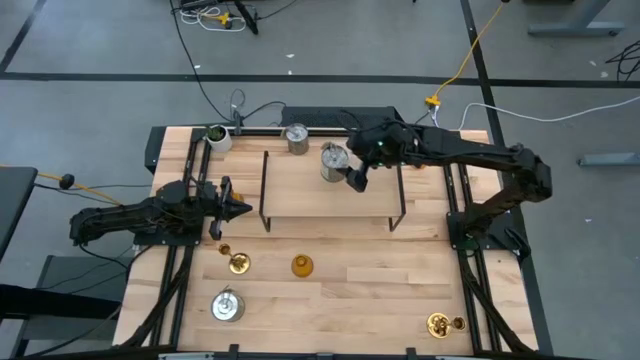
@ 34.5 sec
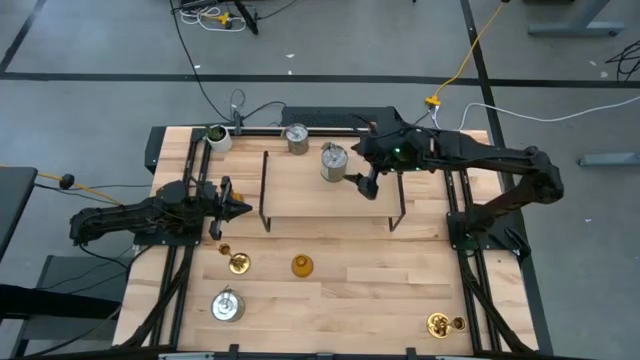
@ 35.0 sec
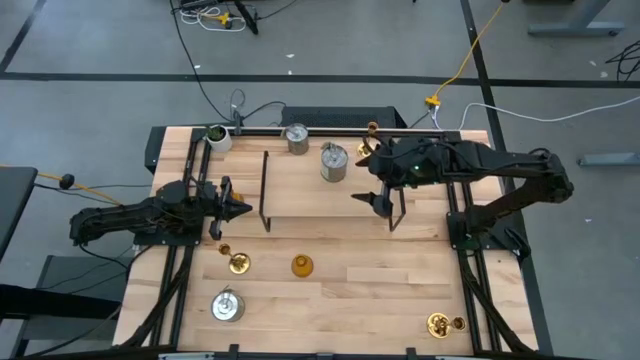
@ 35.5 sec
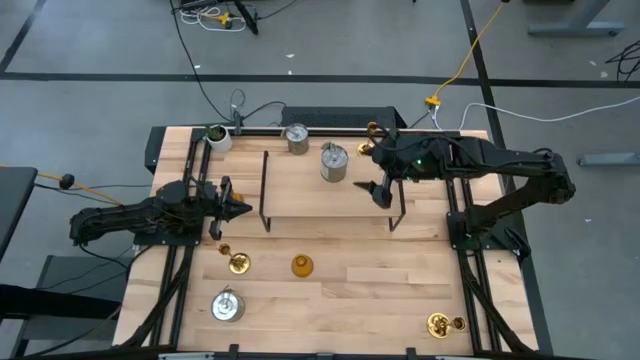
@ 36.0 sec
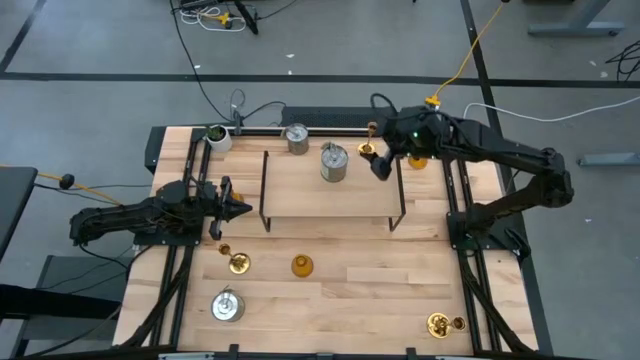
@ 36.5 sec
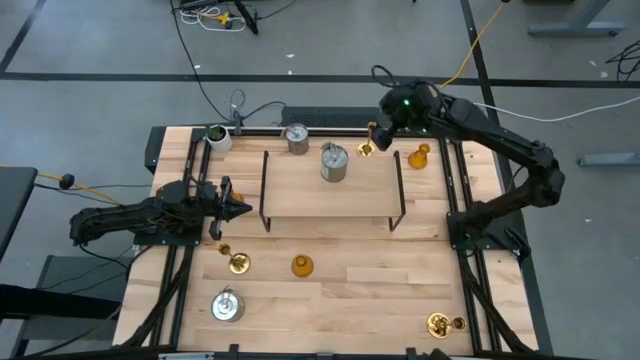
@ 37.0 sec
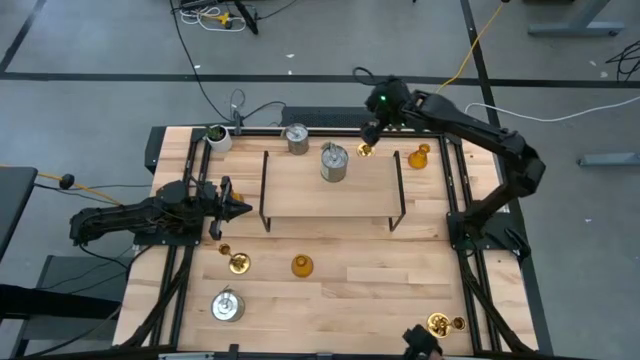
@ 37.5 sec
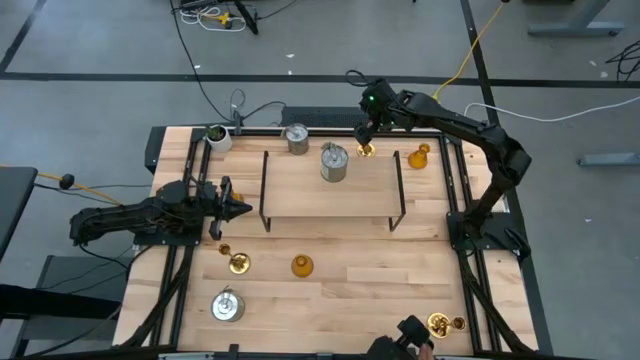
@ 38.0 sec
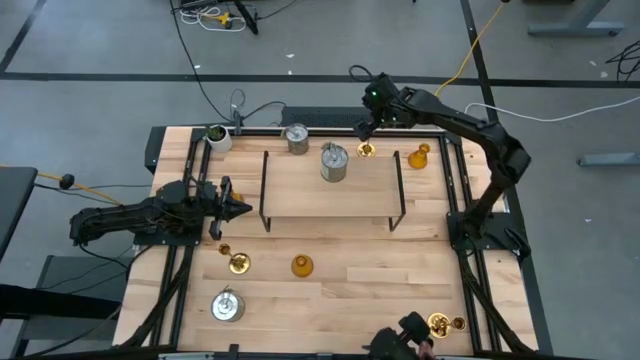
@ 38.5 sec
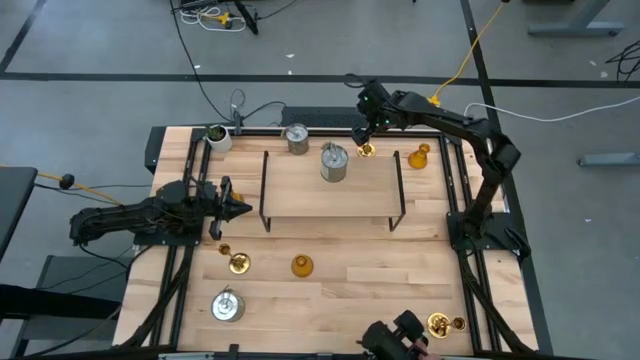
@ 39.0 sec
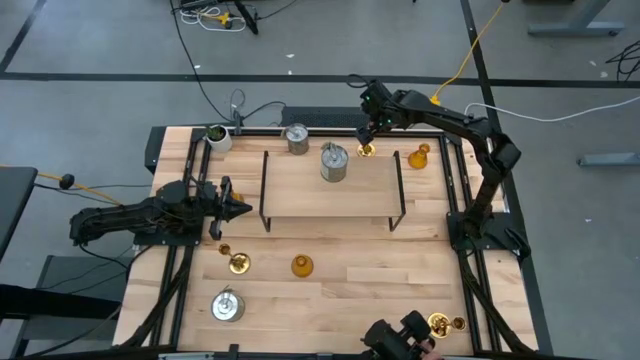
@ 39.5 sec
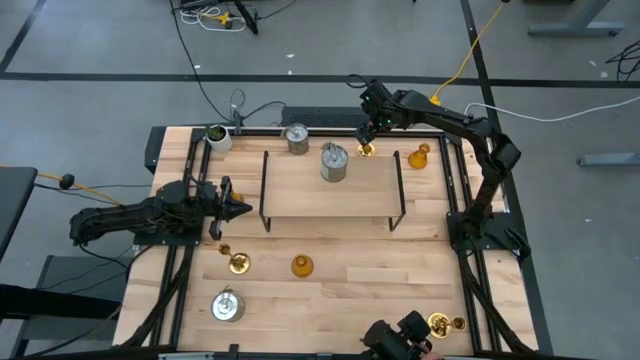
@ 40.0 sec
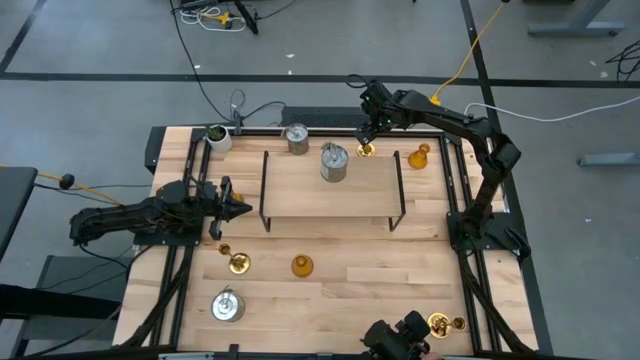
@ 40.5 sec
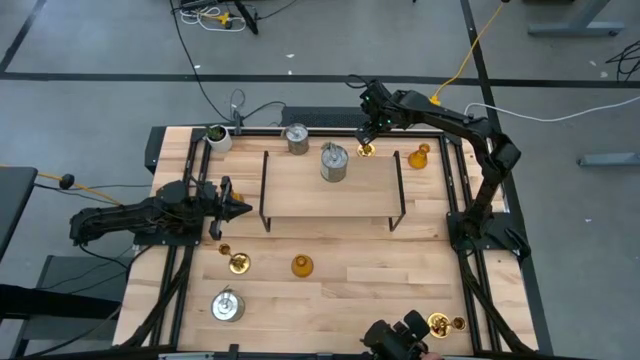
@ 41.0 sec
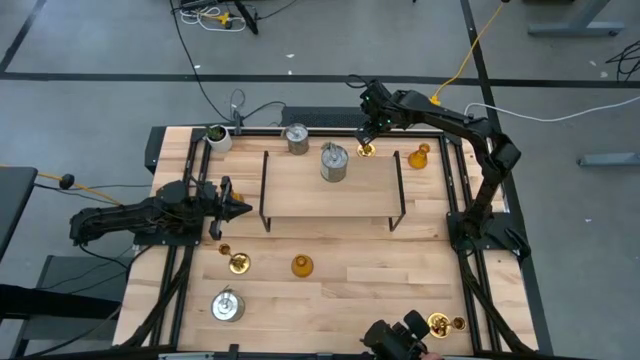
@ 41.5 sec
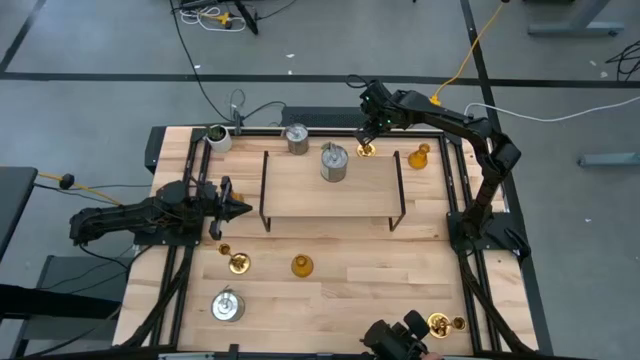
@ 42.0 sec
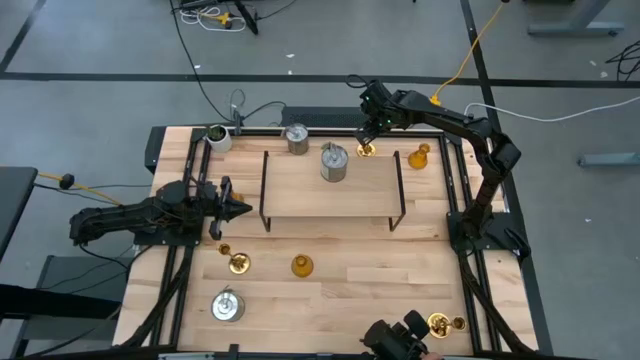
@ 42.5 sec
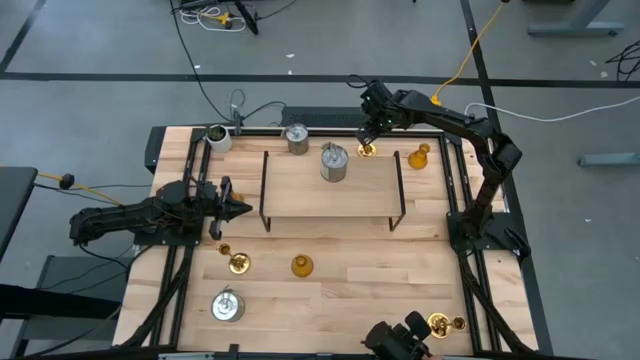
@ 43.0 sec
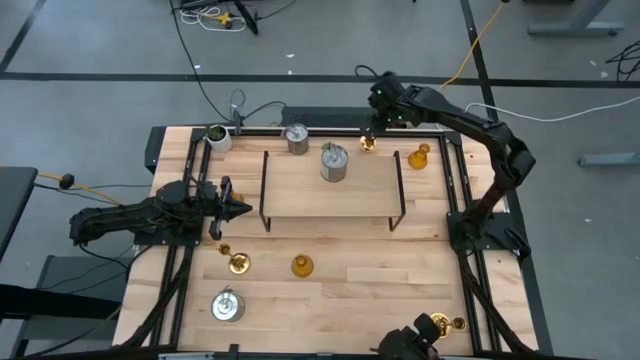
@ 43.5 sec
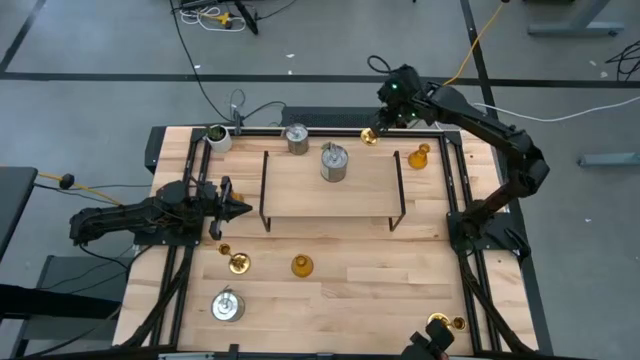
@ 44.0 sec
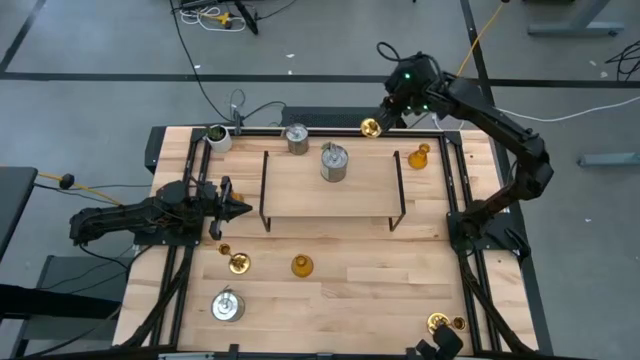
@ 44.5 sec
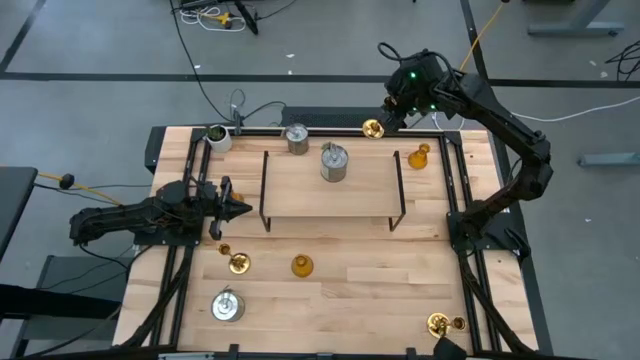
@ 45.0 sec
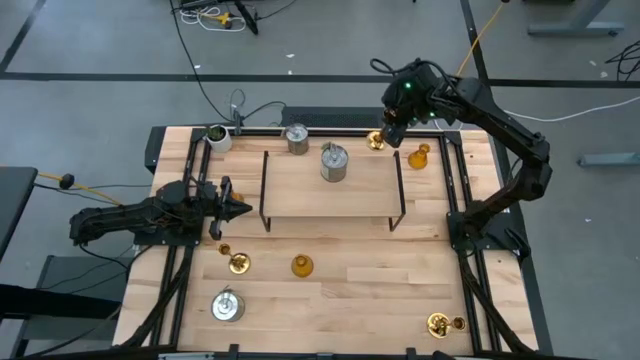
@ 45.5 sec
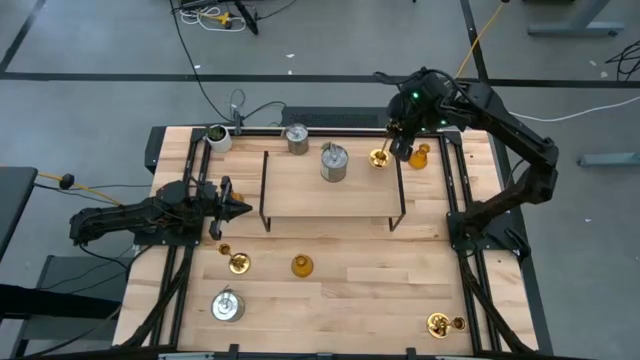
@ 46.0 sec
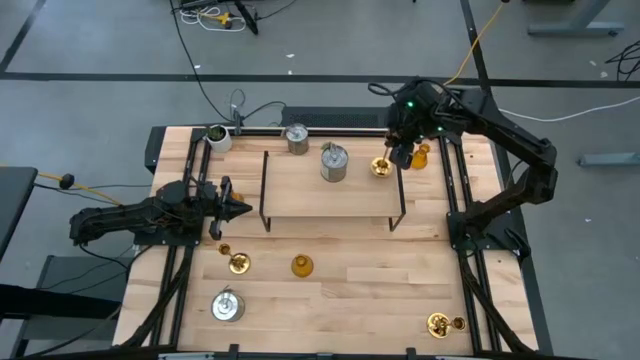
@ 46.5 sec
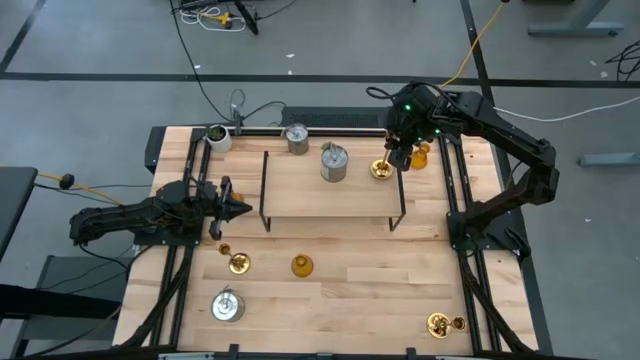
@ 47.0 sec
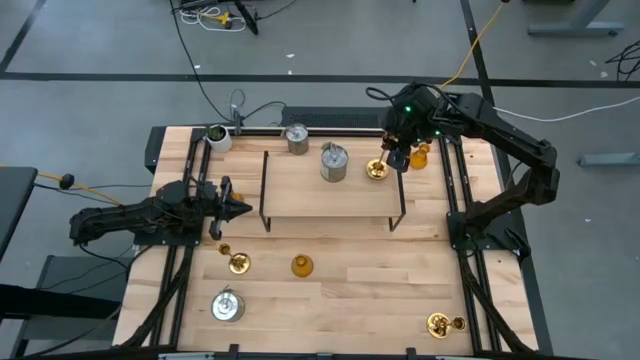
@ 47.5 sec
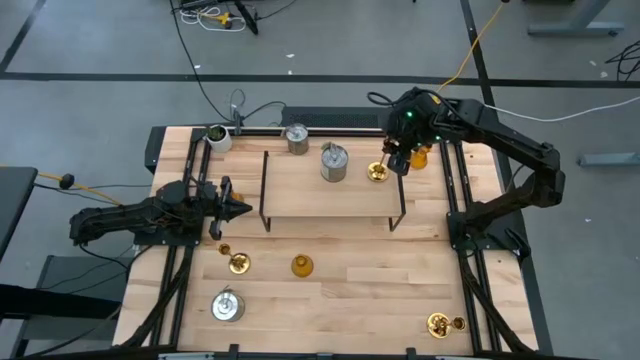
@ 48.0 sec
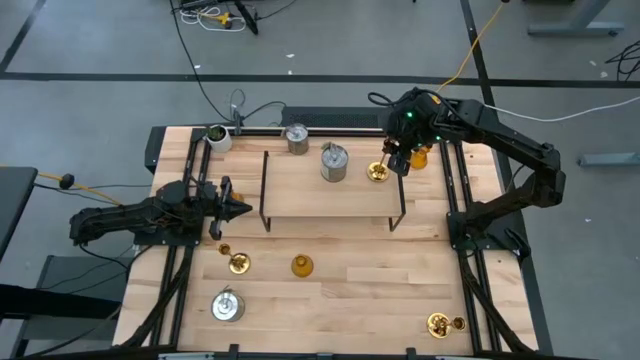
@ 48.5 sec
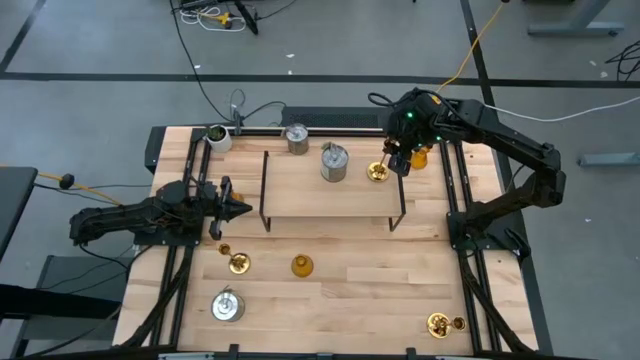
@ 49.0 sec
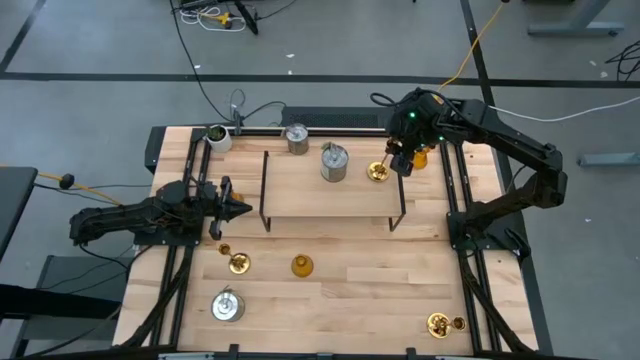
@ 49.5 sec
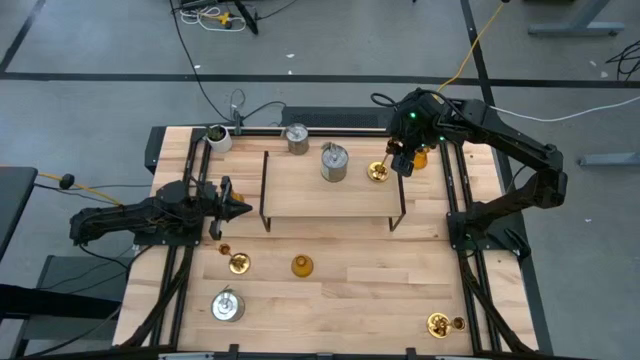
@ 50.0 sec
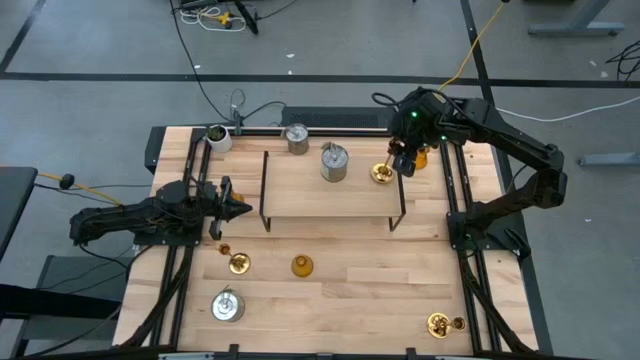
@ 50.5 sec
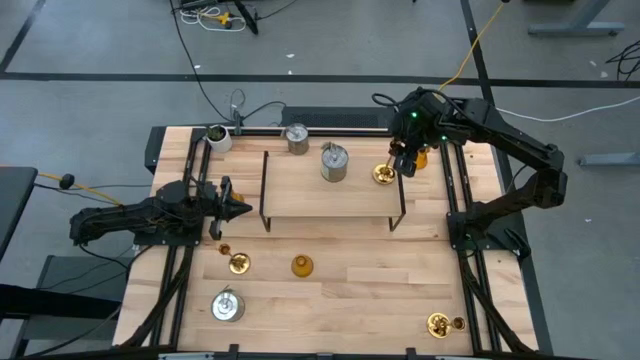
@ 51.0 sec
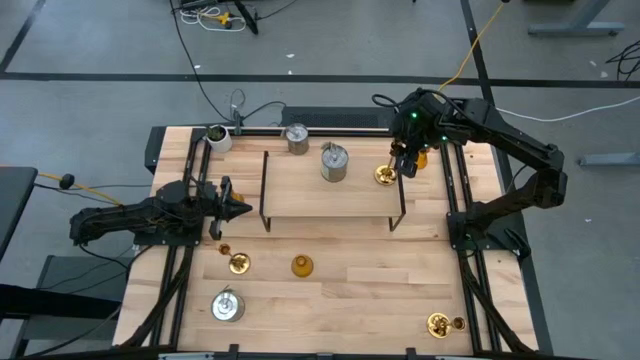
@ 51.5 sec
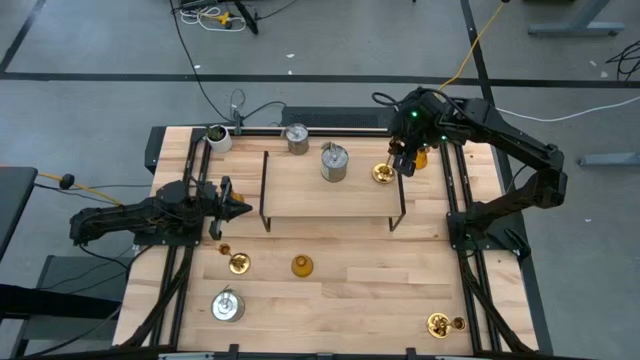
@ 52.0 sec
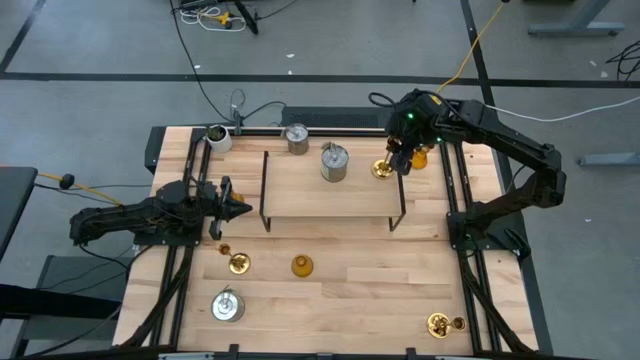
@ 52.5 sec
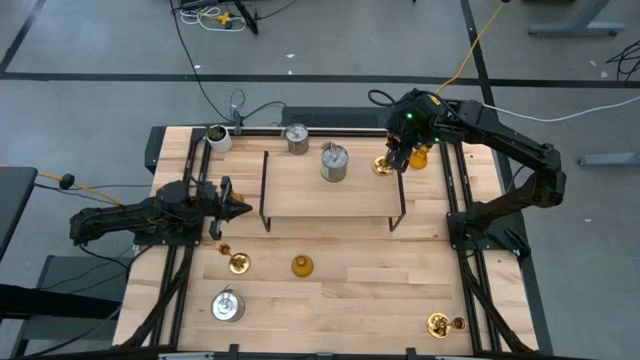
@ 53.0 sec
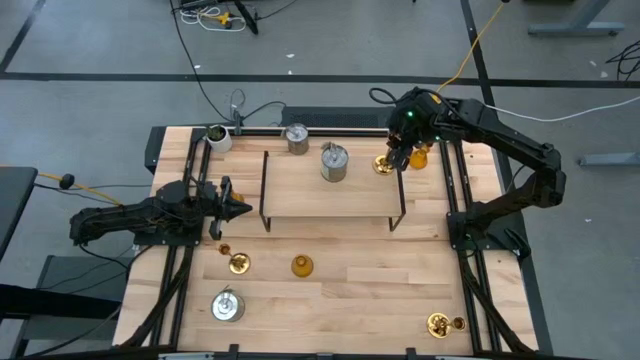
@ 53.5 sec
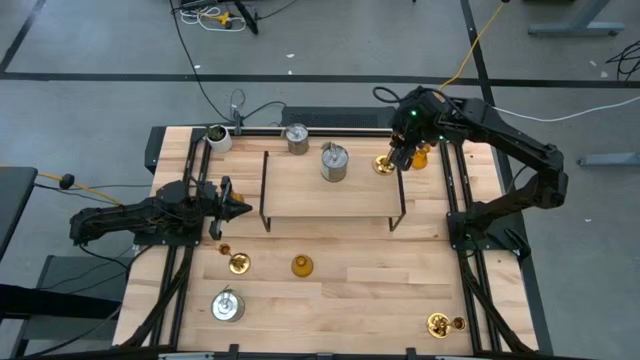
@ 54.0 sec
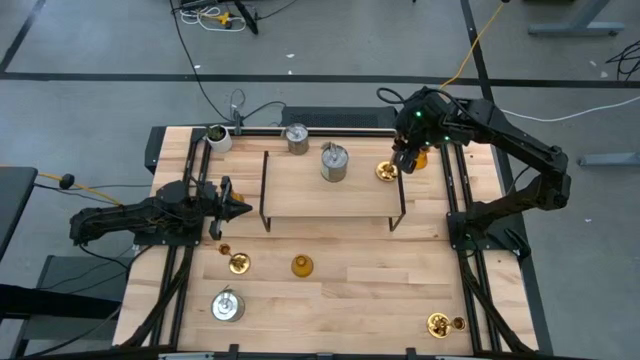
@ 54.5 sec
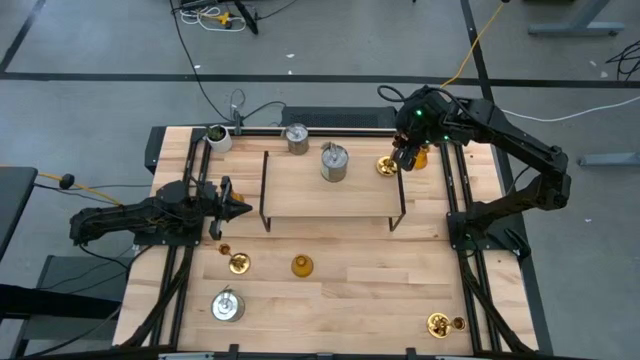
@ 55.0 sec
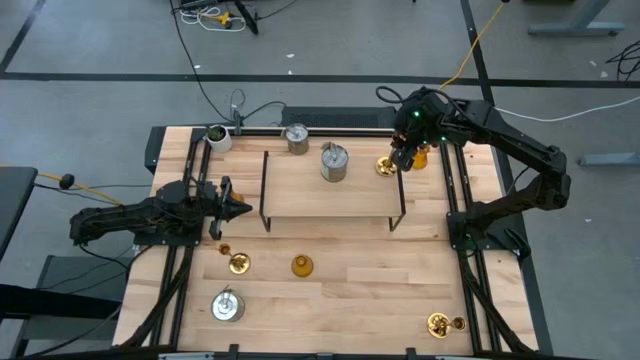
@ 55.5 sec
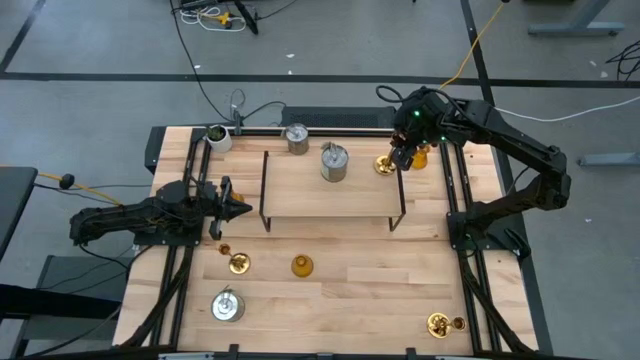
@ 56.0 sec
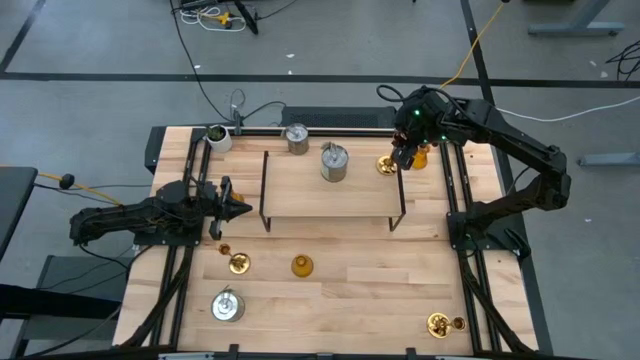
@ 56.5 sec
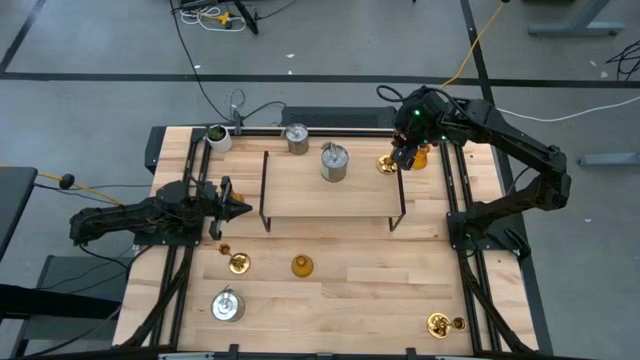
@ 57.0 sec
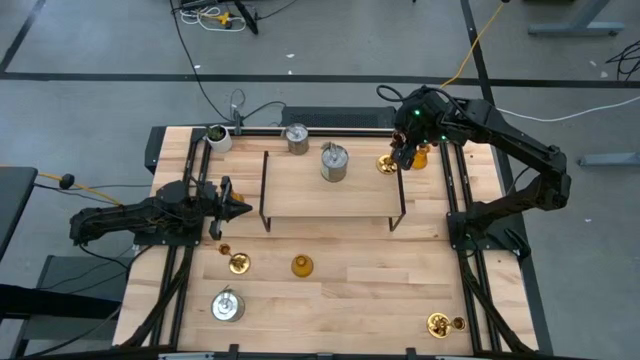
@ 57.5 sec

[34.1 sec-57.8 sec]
Task: Pick & Place candle stick holders
Put the top candle holder on the shelf
